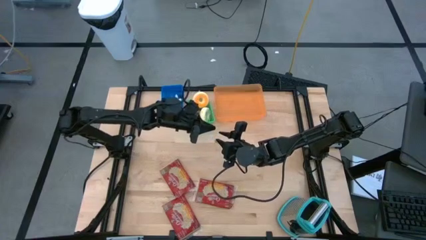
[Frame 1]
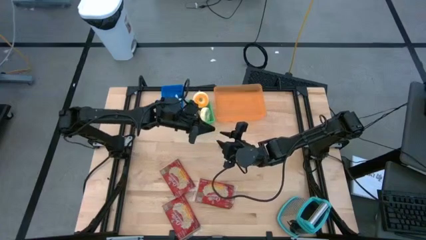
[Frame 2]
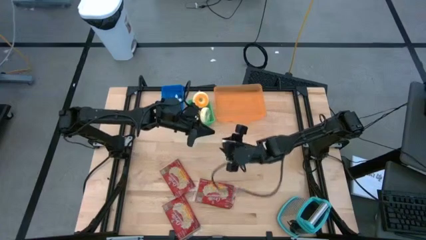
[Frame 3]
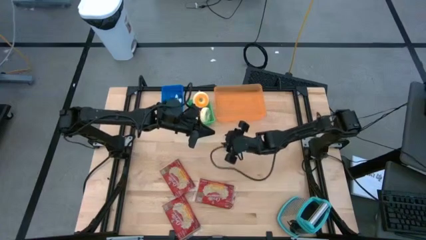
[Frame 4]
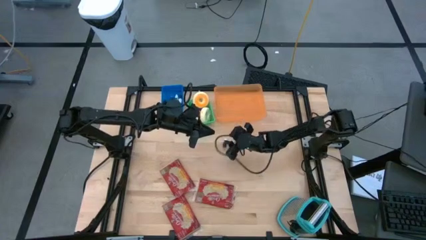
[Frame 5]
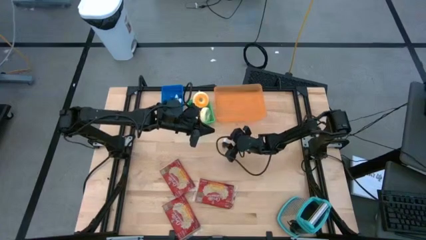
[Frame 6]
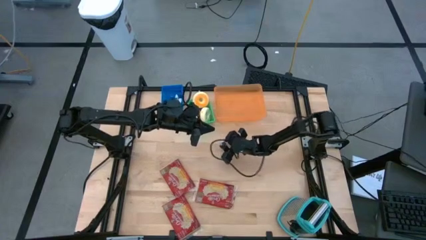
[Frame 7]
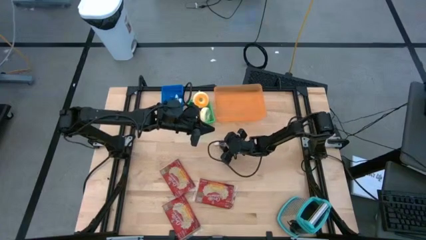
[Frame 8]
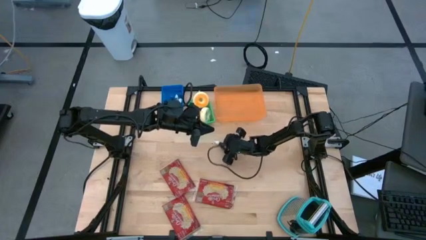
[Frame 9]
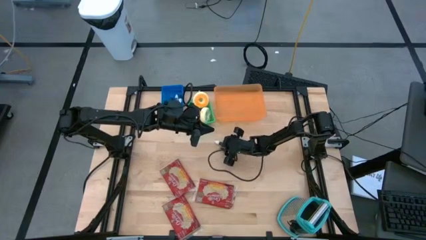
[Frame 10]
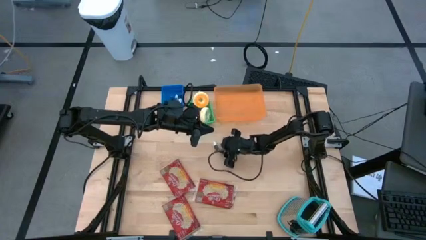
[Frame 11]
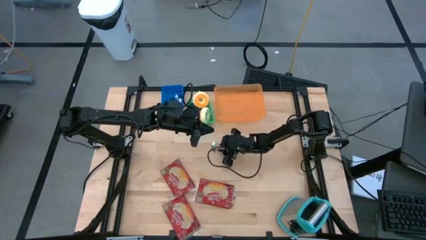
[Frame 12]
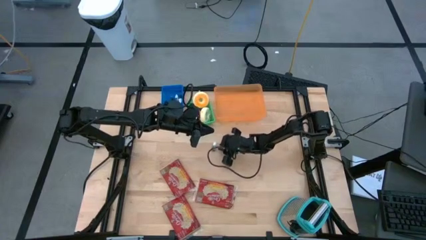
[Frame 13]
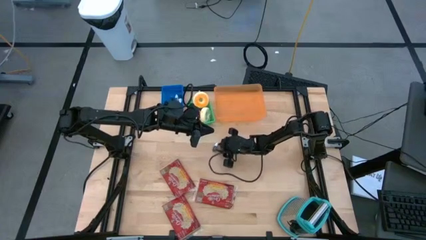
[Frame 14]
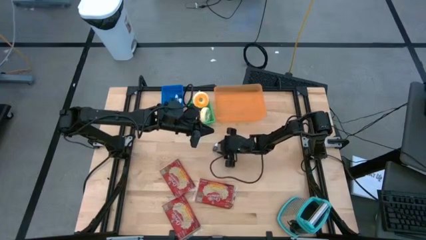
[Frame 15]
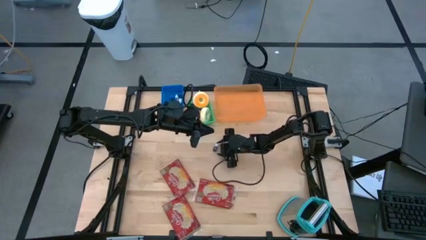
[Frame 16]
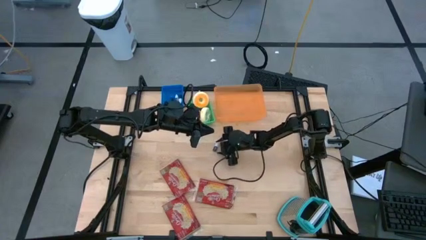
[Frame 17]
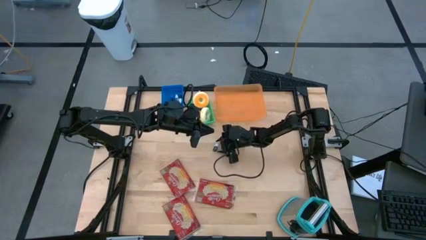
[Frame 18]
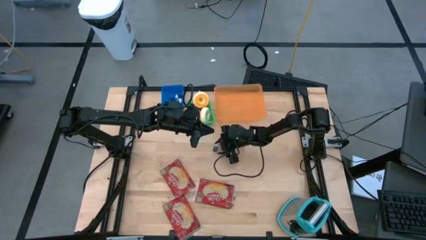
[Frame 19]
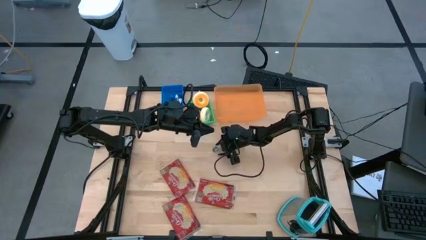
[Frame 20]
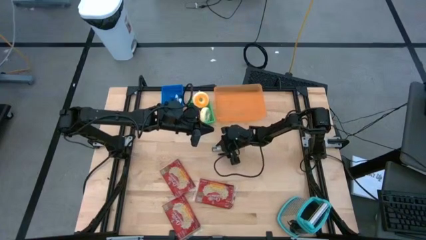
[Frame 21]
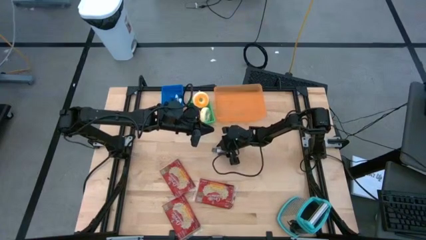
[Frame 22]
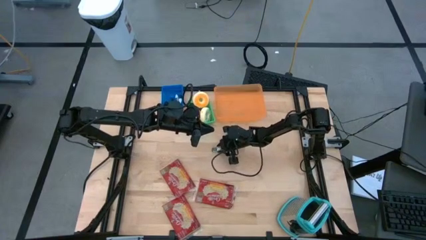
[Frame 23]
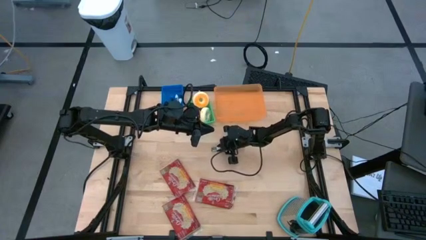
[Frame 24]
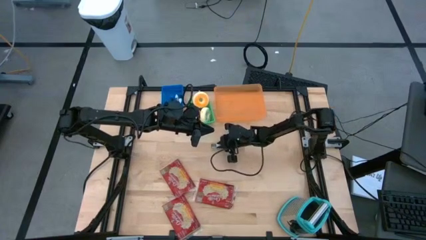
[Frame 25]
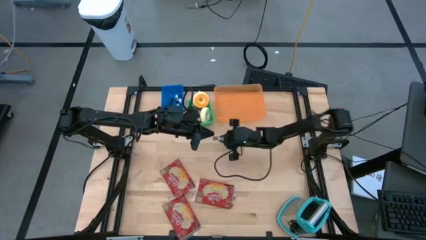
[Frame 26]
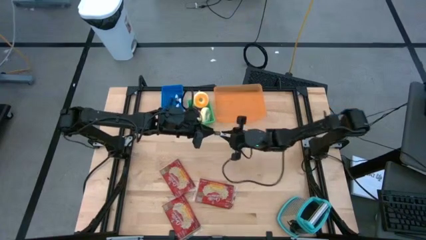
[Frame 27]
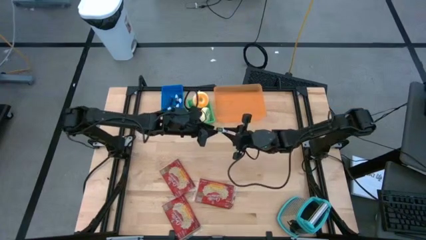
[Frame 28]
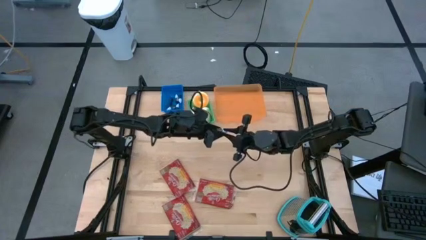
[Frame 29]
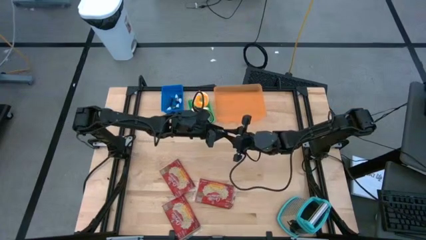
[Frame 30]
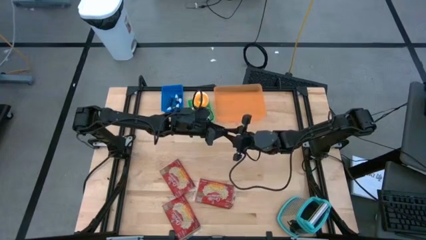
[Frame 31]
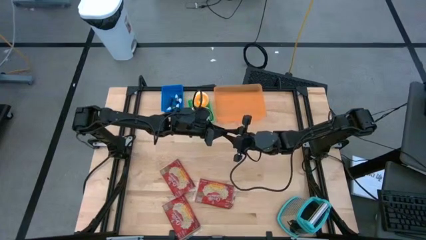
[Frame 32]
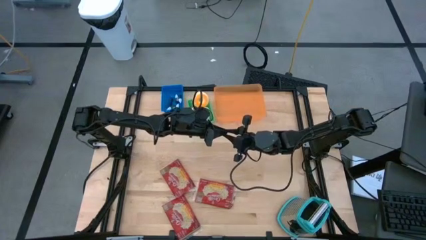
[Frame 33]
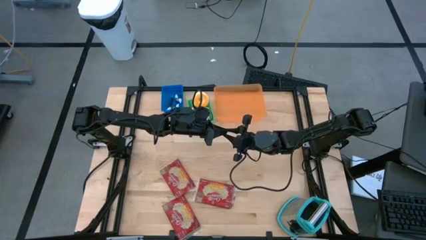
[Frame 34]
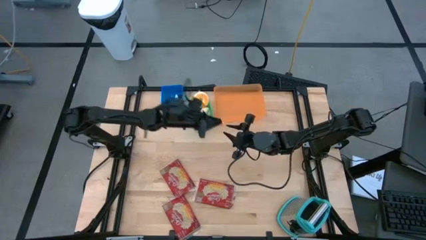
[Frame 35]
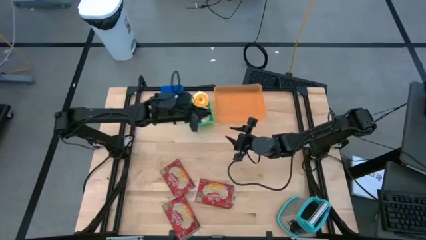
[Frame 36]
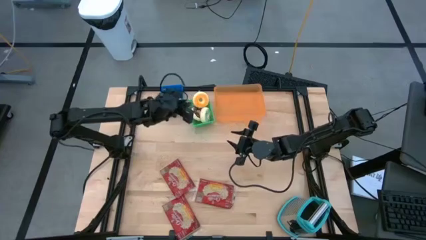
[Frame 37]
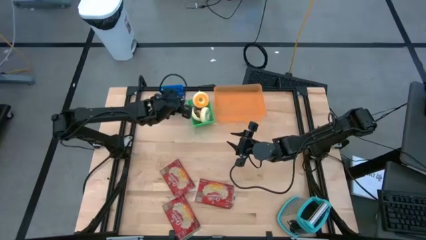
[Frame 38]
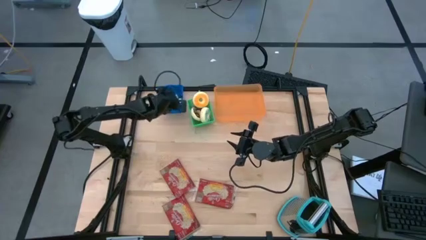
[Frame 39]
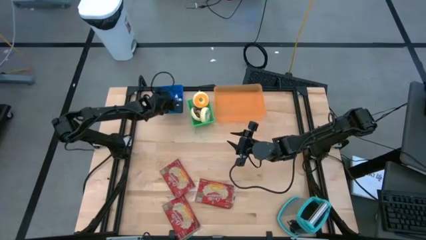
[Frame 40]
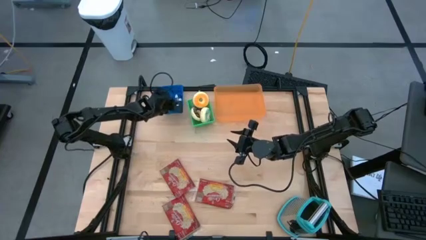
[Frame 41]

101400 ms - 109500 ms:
Put the dark green food coloring bottle into the blue bin

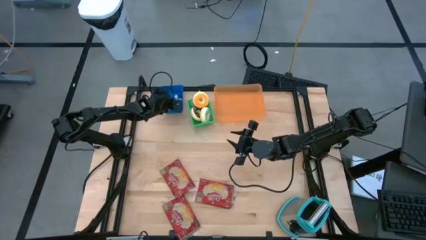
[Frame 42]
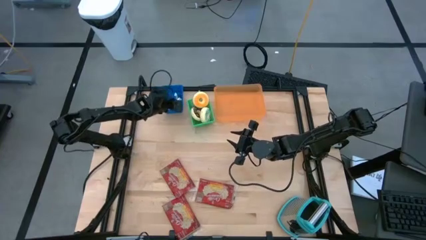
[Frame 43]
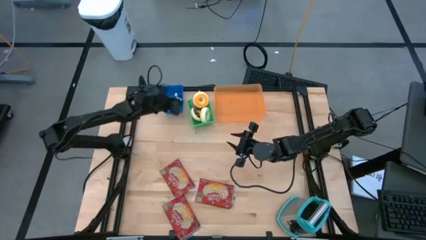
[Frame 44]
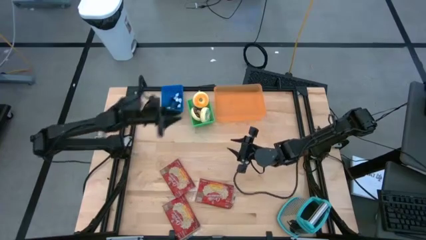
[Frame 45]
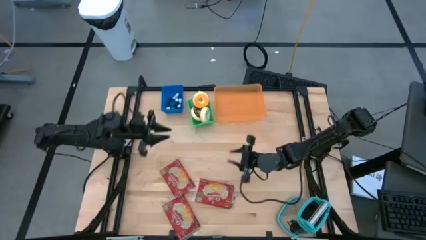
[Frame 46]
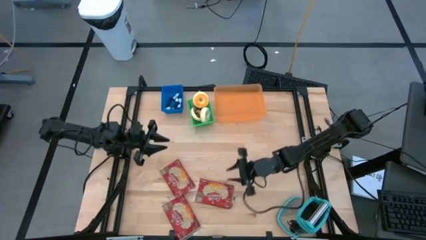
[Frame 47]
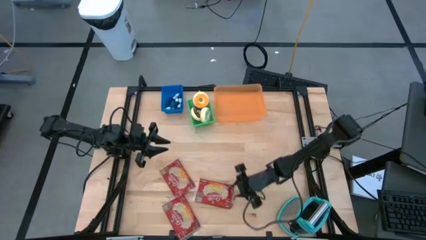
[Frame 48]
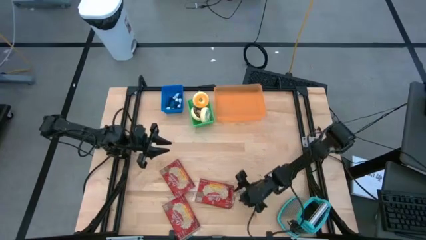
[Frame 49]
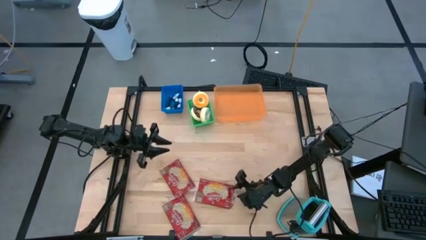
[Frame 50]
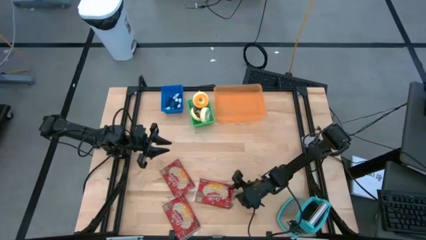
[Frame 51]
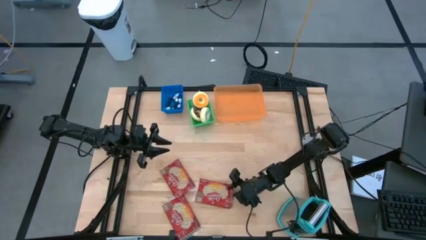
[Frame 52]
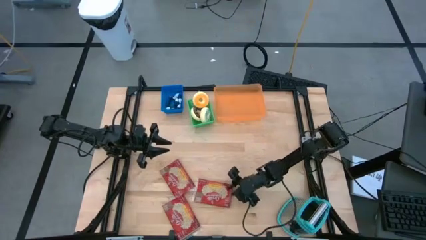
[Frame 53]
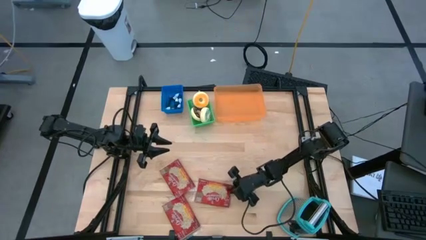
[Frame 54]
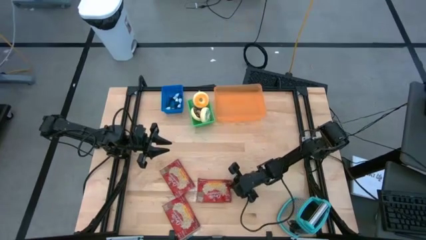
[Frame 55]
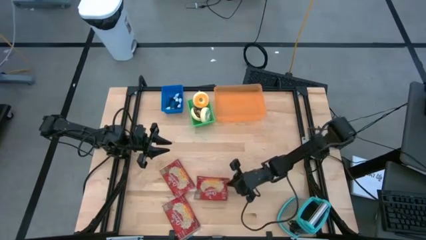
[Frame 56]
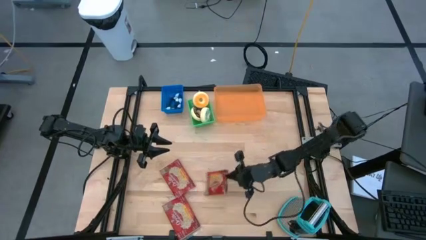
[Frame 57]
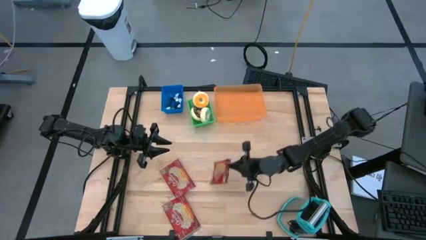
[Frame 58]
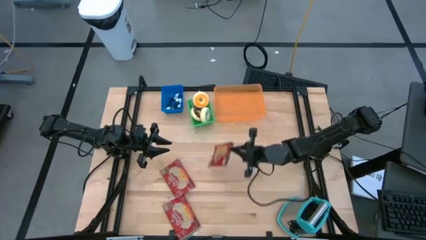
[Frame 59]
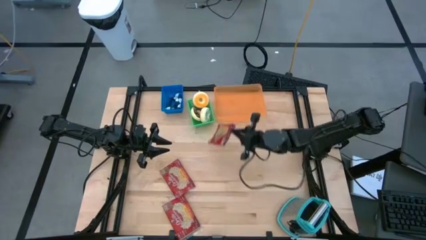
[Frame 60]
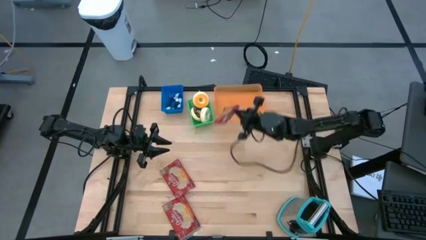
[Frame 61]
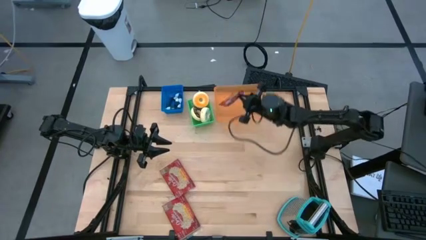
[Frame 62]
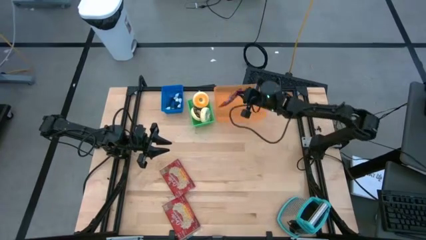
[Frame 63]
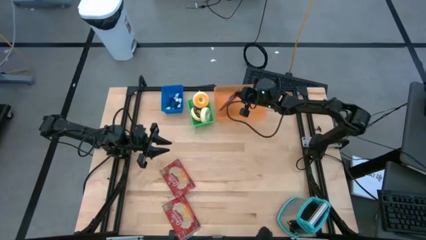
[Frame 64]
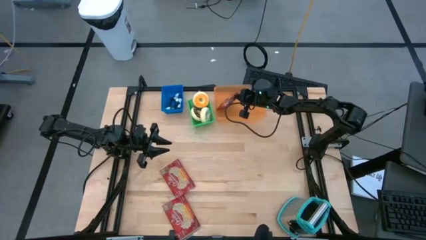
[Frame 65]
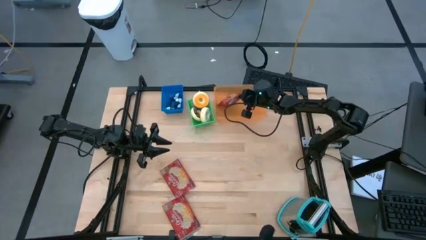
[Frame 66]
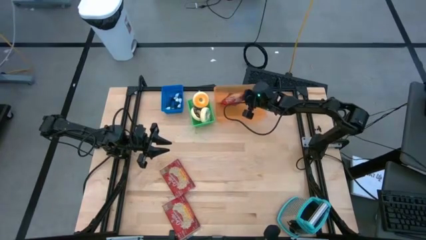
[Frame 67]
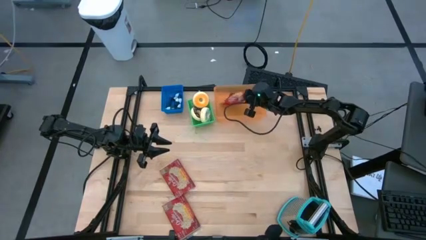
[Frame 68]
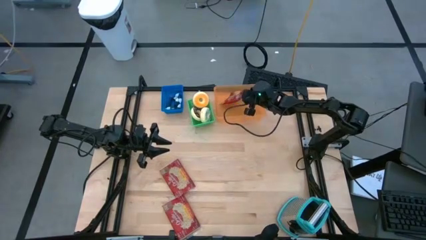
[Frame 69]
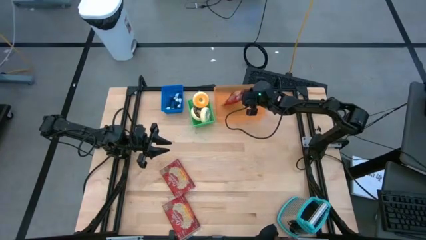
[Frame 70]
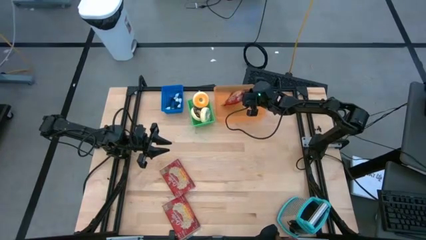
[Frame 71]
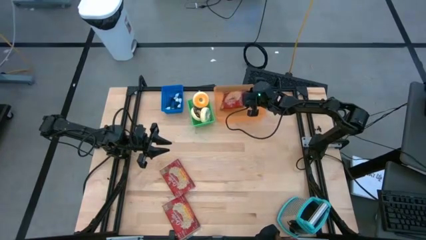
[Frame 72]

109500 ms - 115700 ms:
Put the middle red popcorn bag into the orange bin

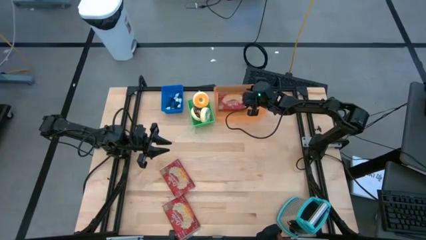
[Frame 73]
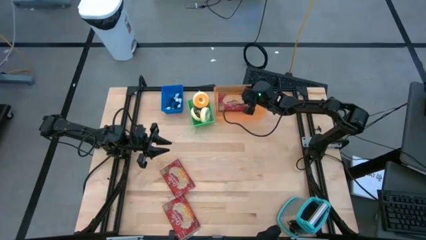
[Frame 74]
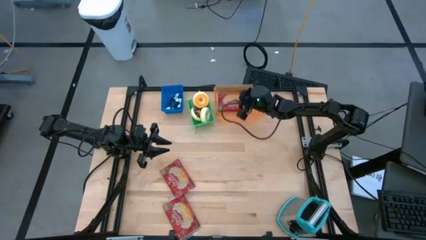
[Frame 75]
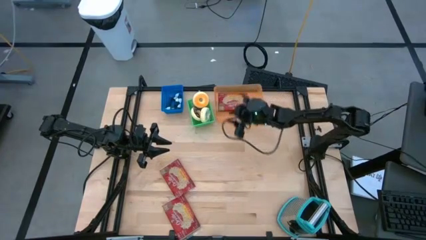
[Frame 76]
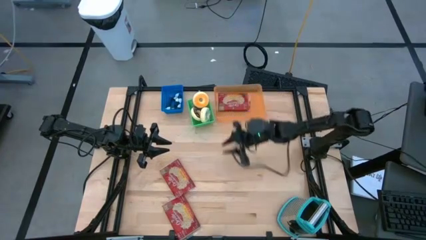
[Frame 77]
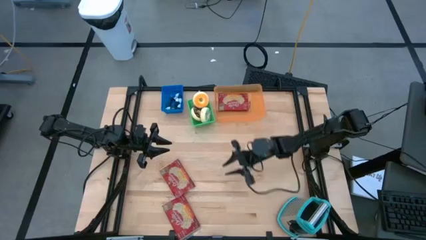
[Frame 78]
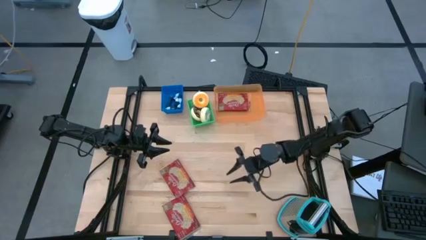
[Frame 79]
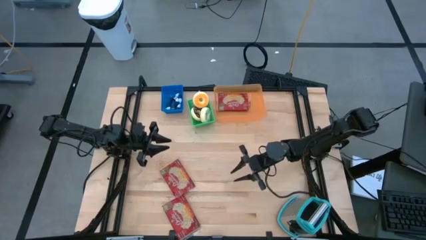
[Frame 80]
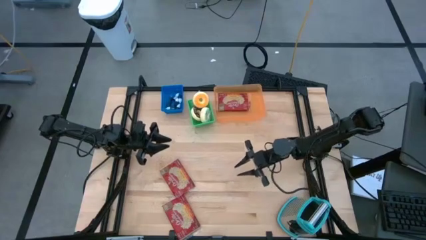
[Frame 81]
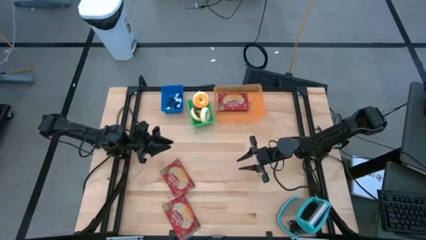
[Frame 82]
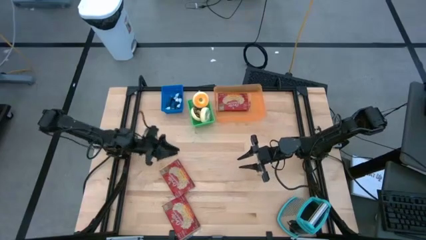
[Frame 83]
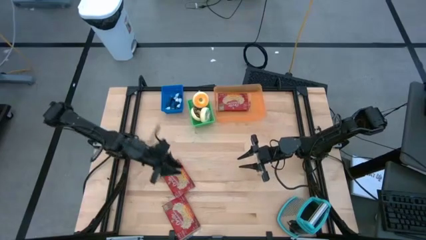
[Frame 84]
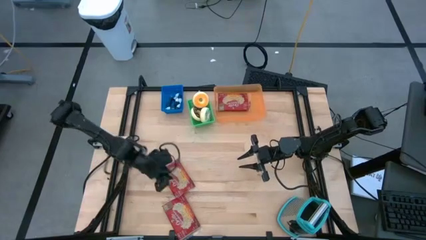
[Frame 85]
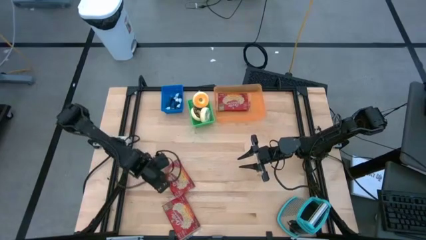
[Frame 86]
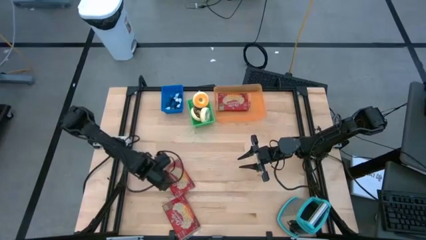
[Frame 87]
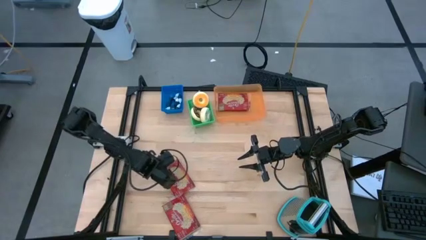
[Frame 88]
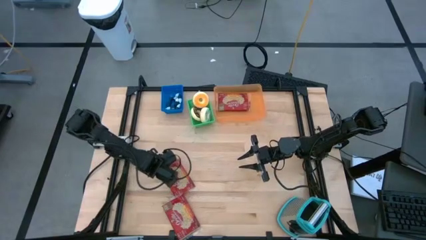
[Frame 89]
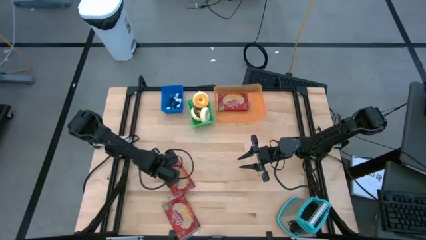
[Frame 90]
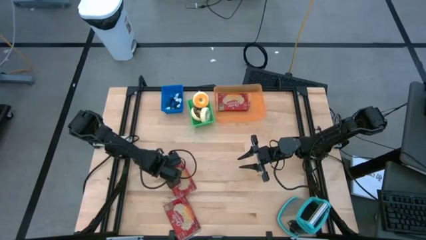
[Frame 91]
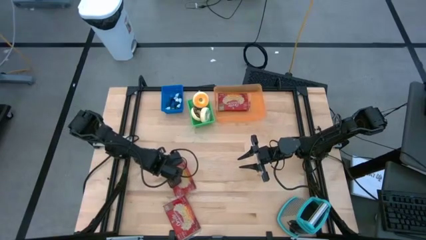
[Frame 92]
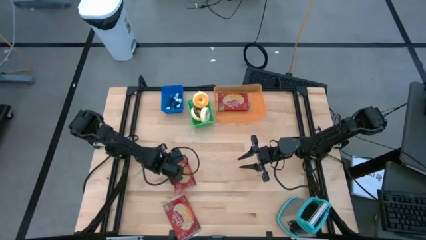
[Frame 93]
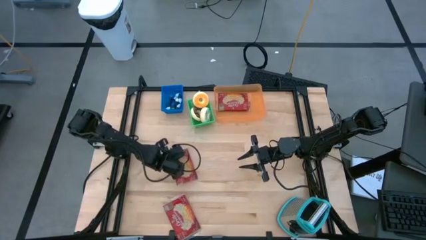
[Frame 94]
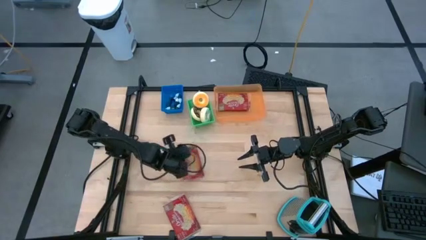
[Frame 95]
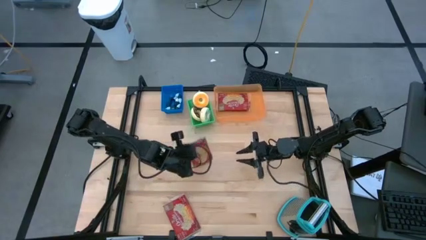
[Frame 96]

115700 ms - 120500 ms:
Put the top red popcorn bag into the orange bin
